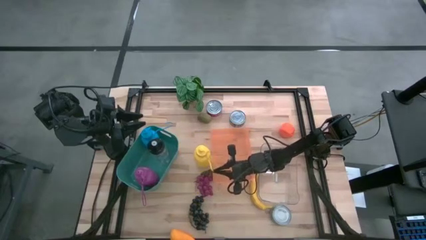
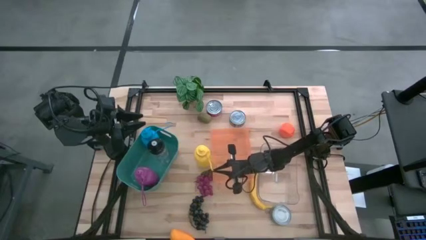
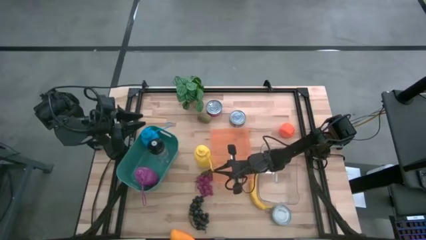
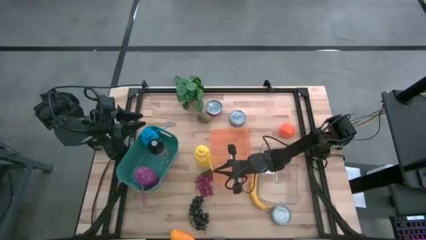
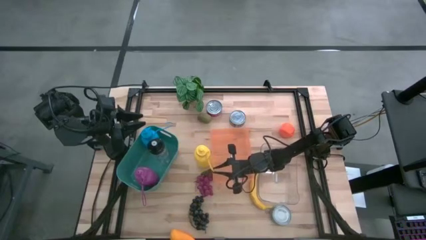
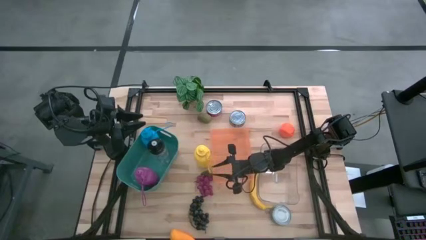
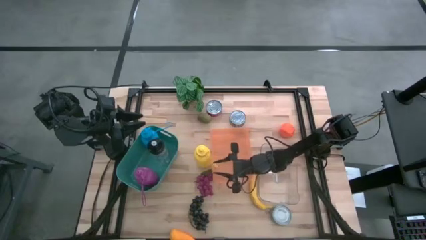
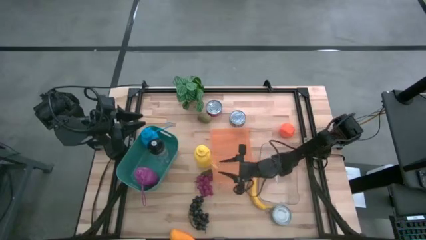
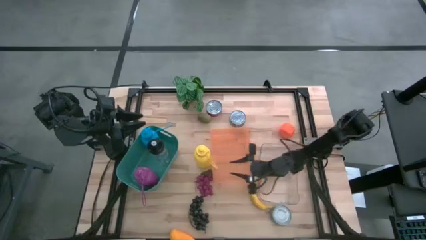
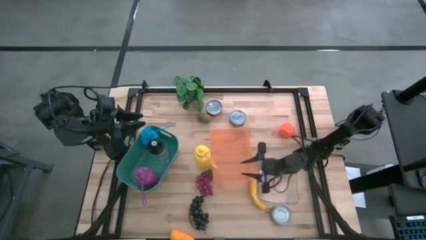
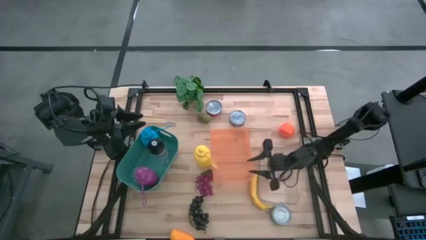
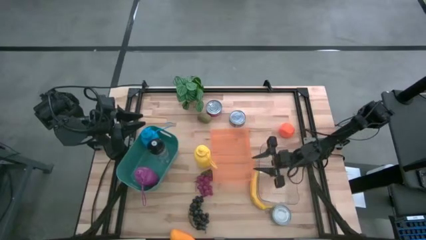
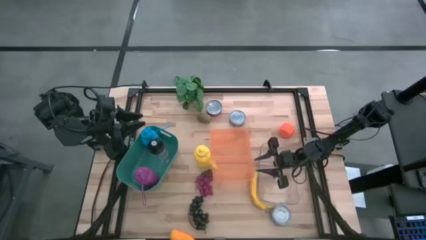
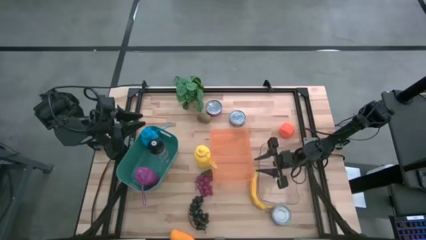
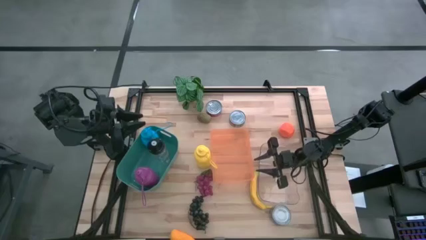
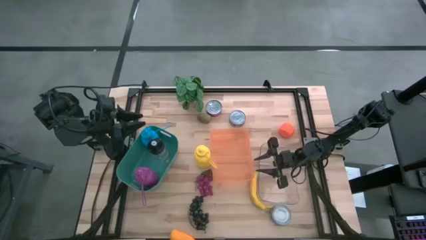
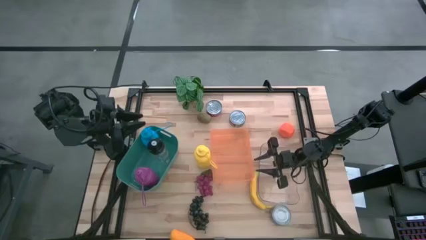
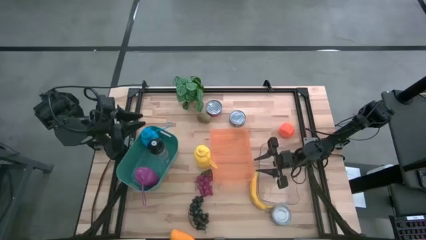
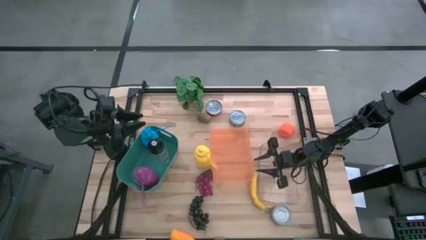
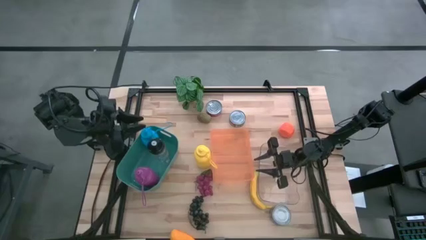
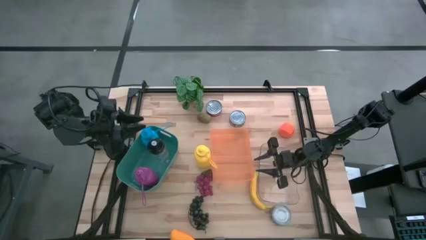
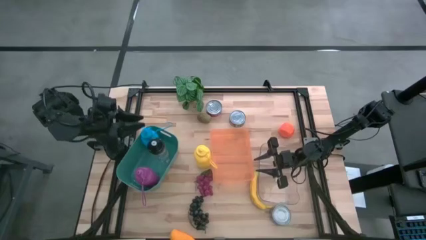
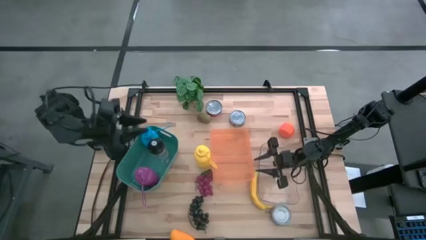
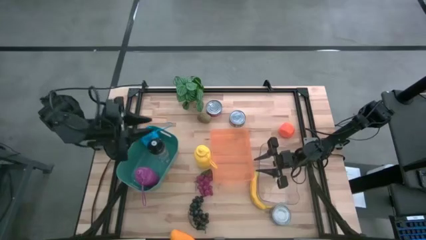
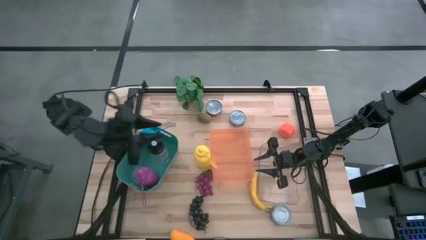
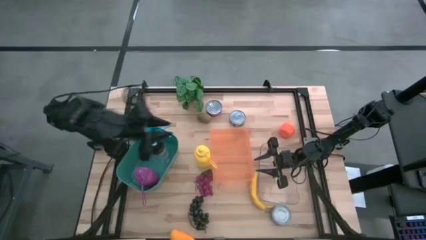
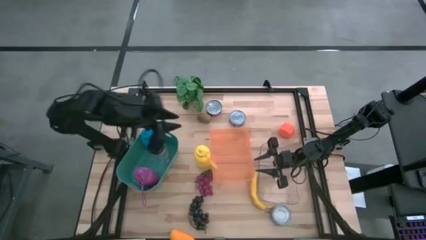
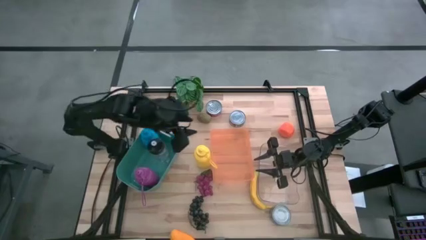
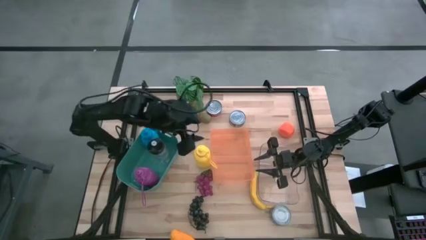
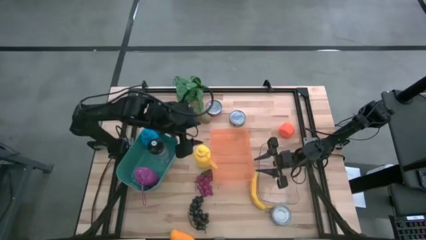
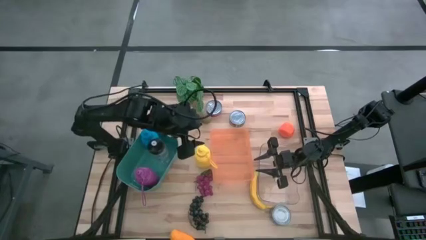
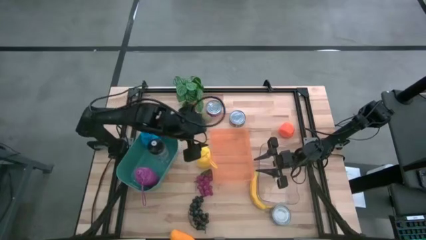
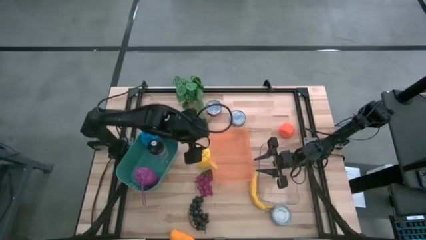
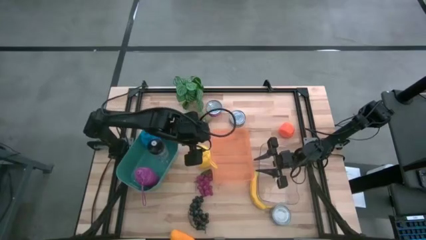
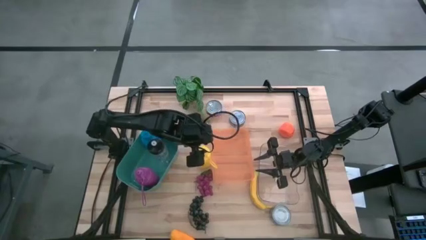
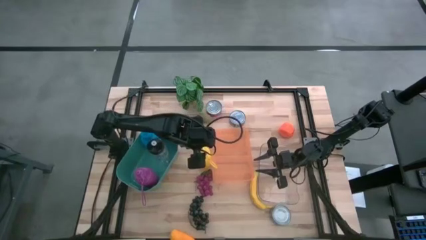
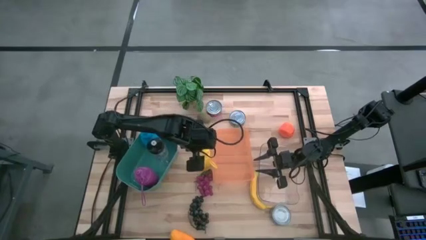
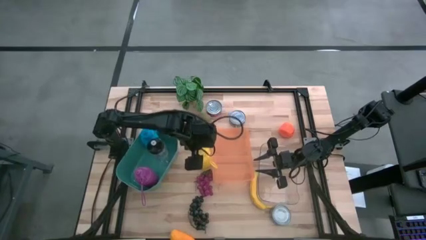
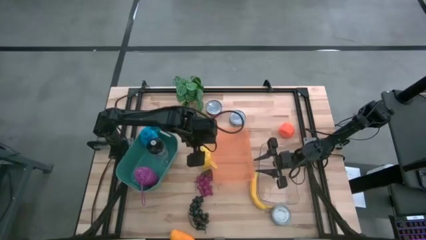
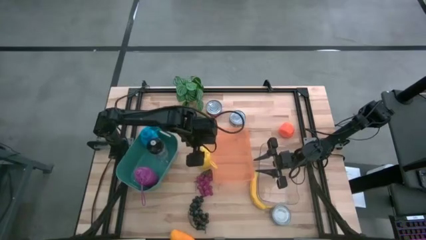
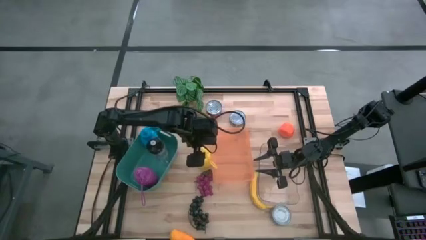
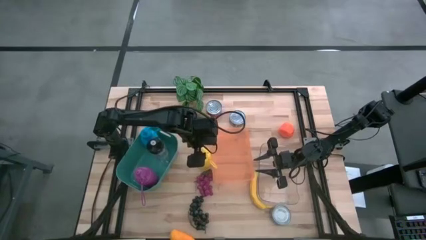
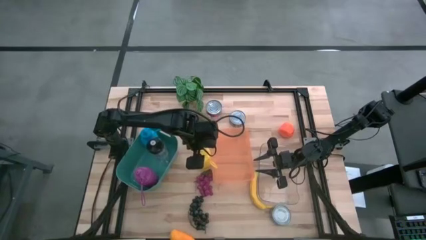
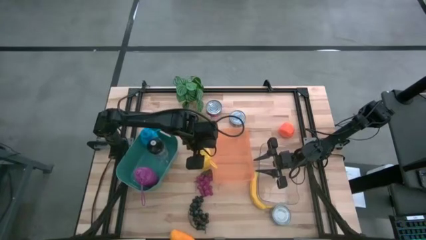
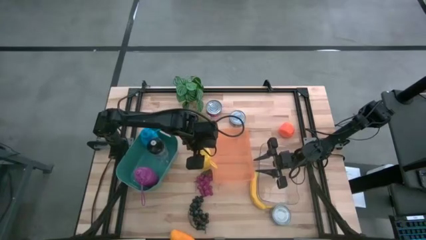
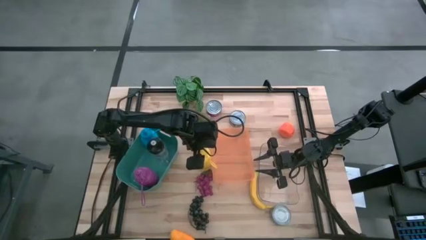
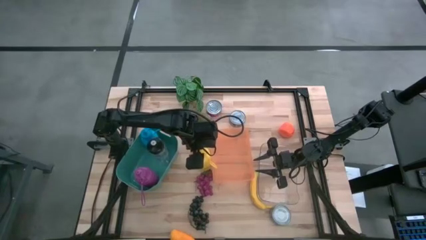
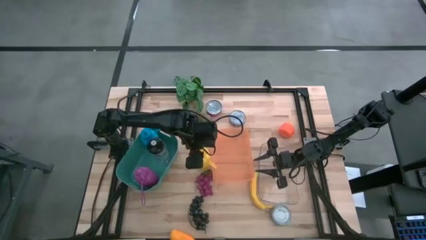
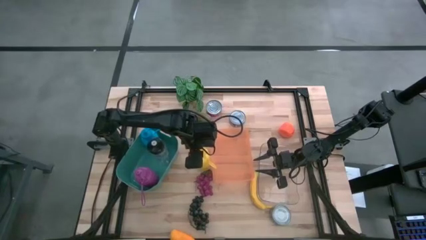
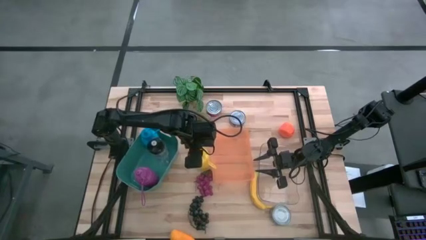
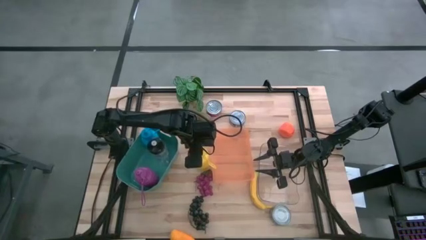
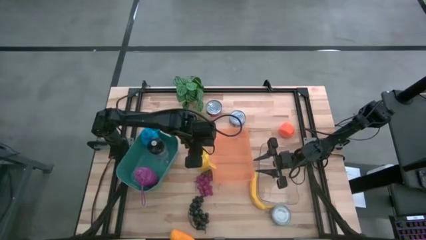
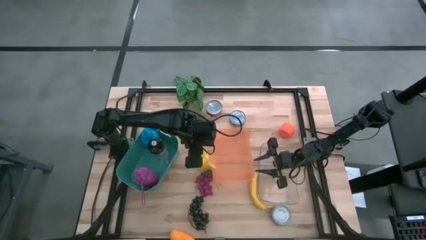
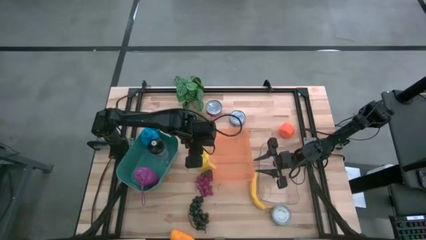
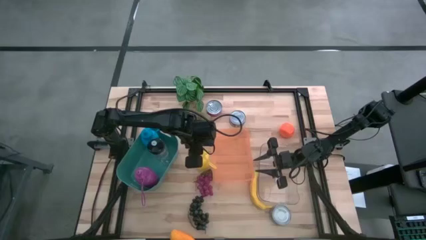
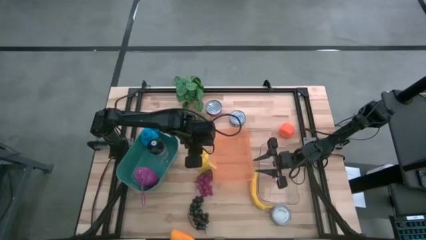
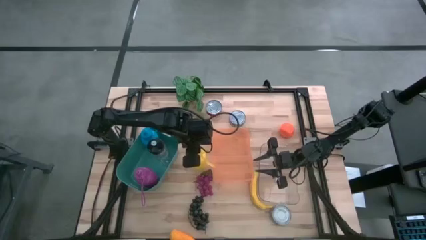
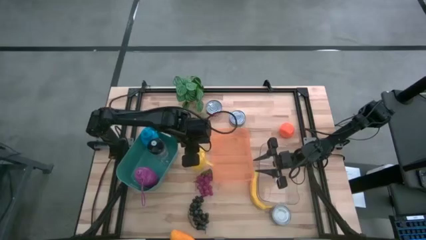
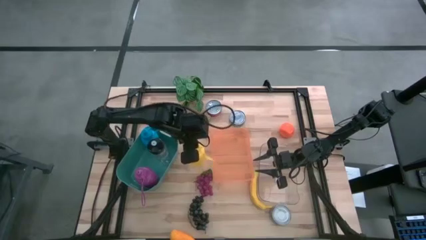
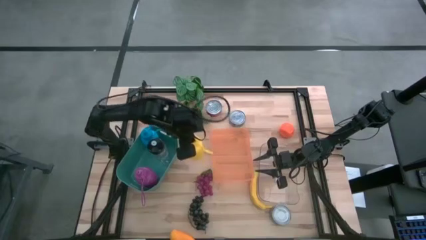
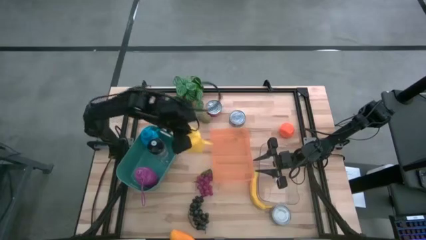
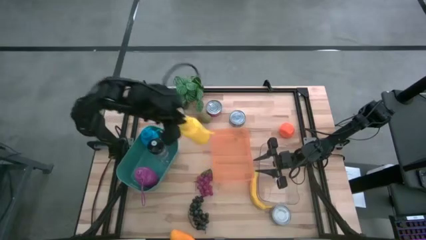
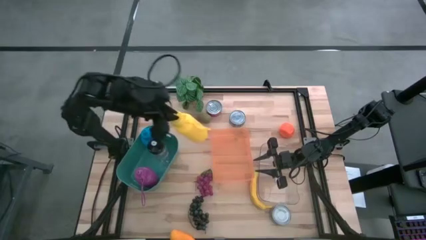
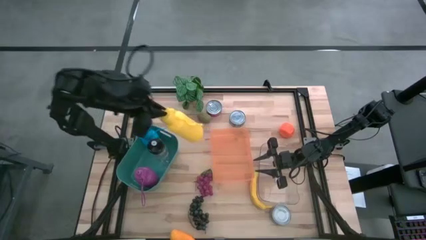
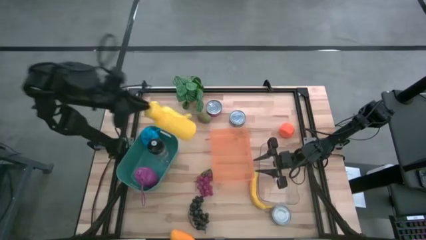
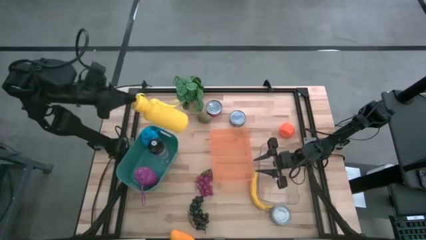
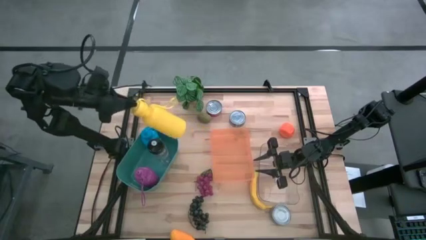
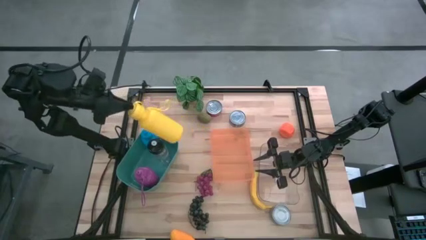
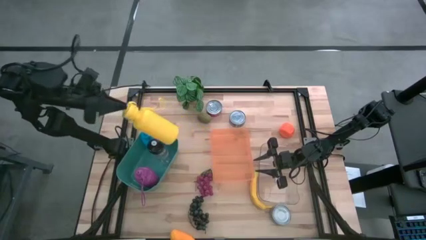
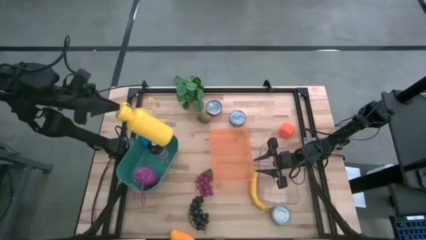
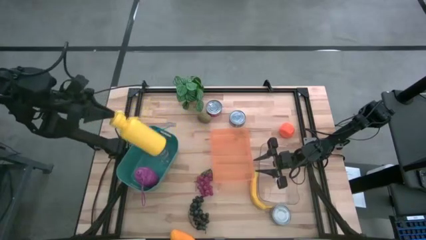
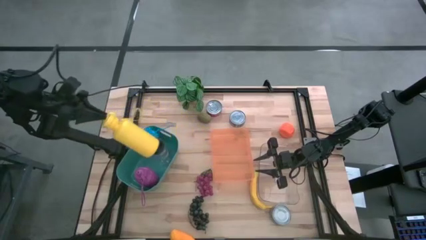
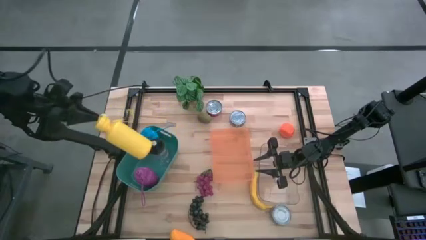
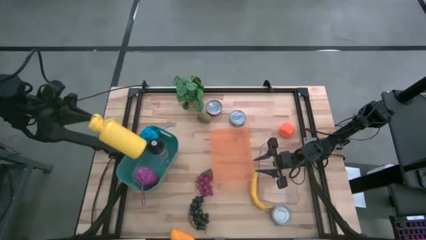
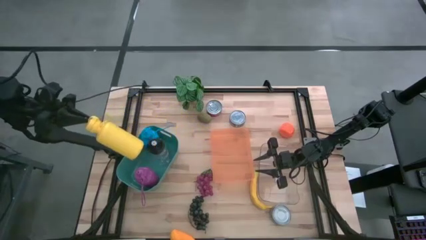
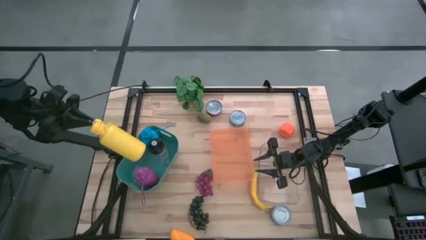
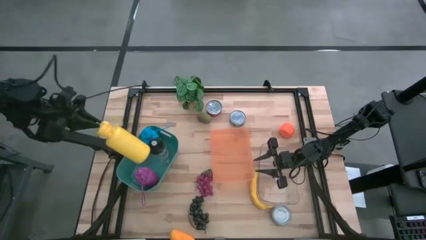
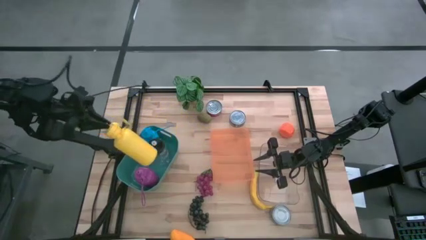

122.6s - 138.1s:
Task: Pick & Place Food Item
Put the yellow water bottle into the green bin
